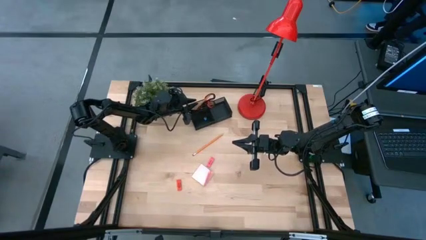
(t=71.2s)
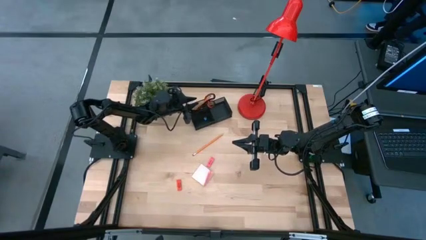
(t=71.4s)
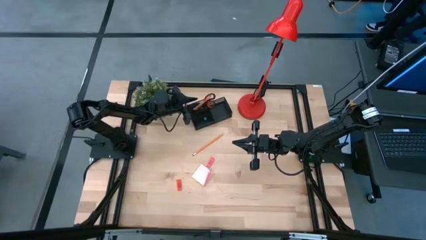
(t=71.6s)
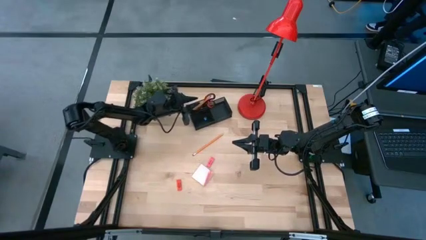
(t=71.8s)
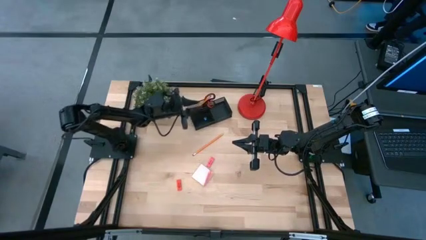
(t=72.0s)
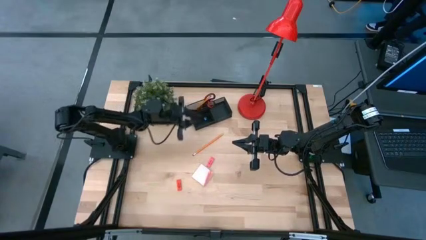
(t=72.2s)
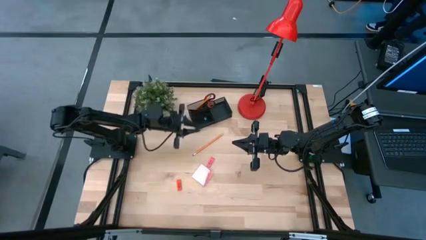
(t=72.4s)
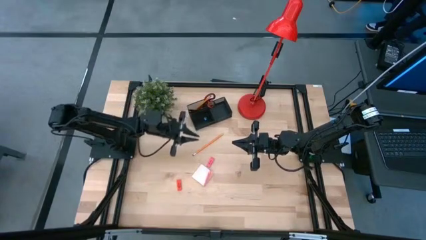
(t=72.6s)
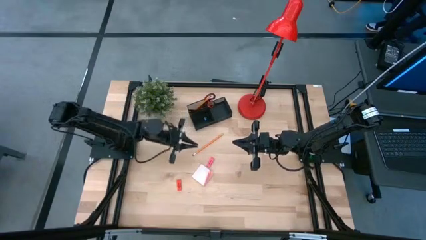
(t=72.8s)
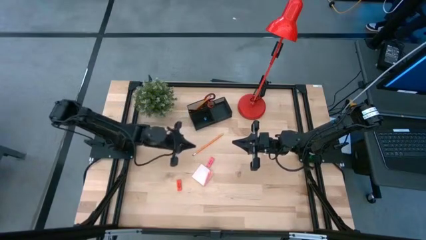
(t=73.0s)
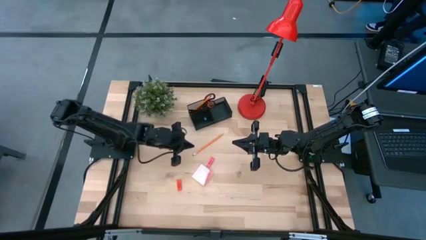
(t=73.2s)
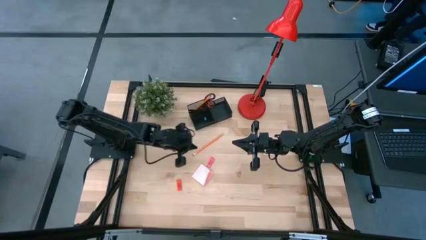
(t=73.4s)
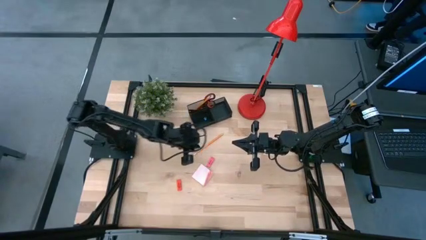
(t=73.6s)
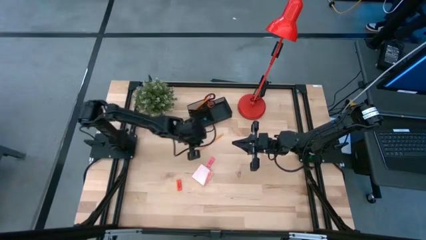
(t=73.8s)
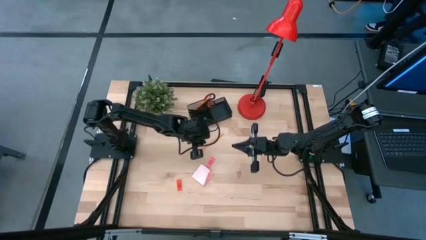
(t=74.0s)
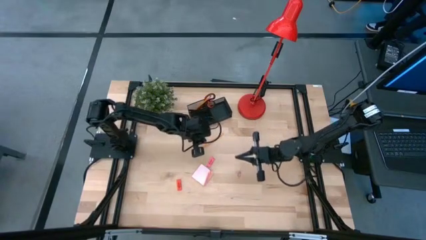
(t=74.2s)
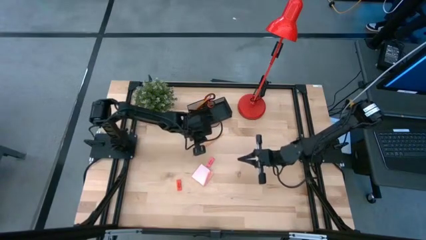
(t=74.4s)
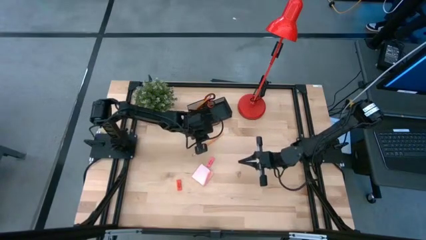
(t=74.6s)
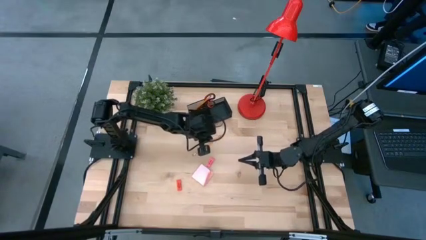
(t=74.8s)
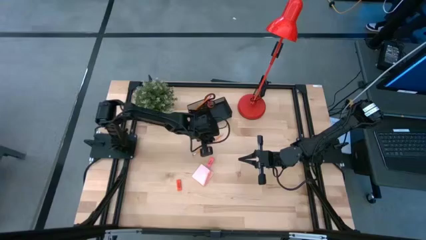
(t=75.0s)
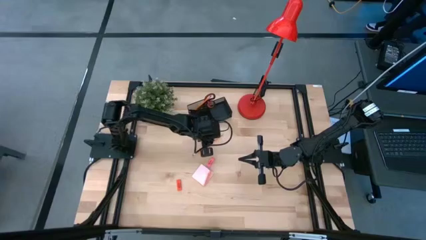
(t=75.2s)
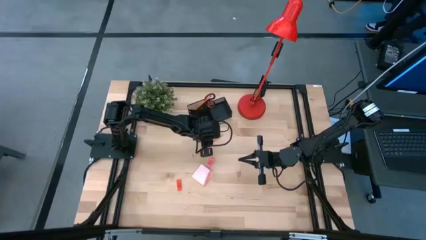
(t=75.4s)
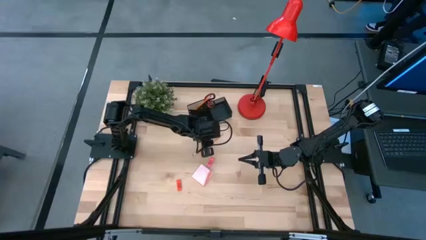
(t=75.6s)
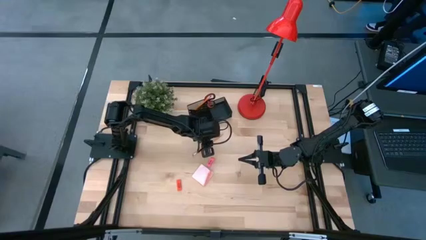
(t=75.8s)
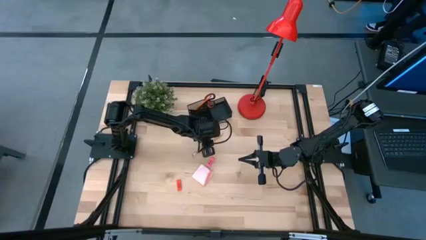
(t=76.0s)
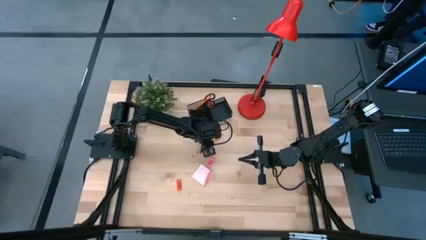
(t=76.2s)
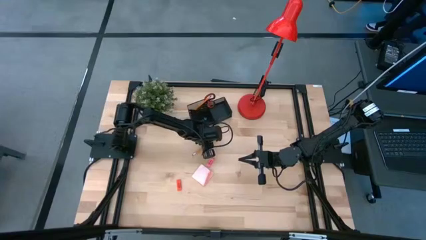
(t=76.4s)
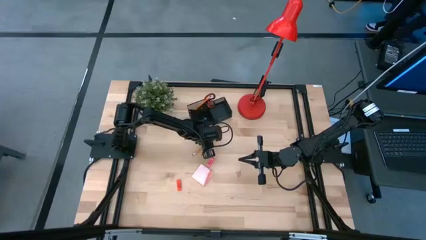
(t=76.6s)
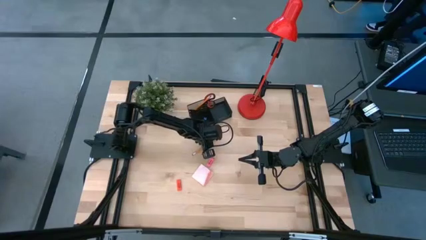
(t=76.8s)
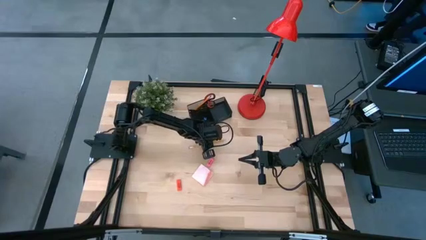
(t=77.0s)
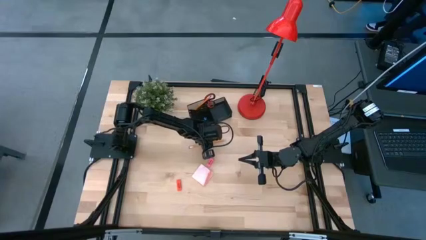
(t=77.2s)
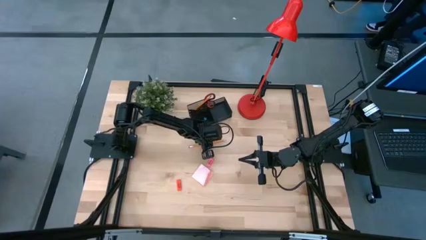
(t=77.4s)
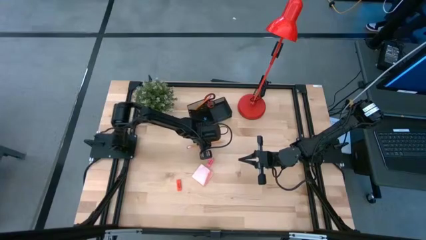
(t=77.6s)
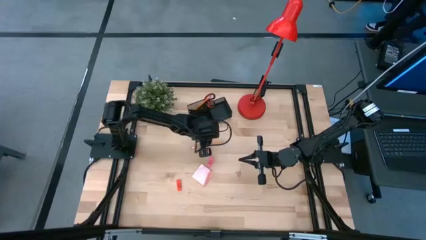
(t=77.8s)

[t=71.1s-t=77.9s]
Task: Pick and place office supplies into organizer
Put the orange pencil into the black desk organizer

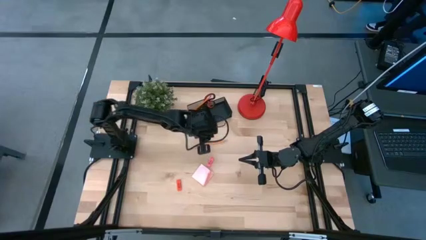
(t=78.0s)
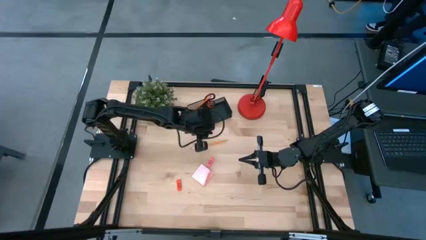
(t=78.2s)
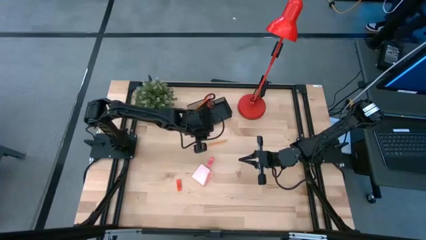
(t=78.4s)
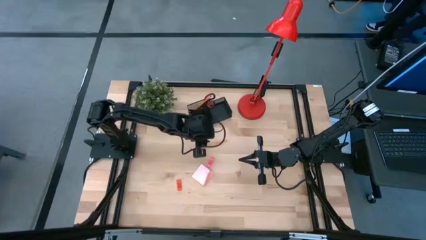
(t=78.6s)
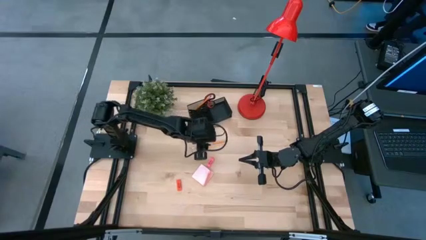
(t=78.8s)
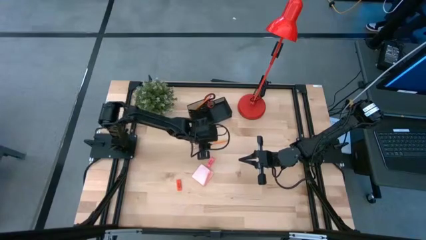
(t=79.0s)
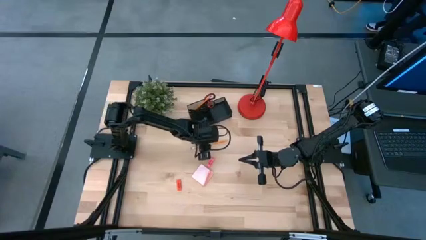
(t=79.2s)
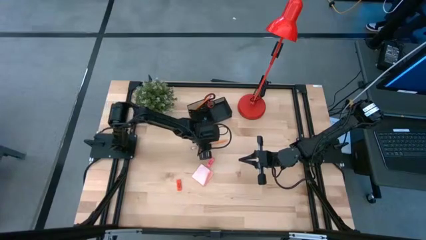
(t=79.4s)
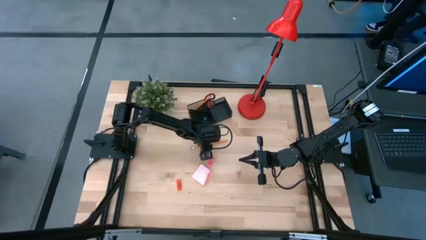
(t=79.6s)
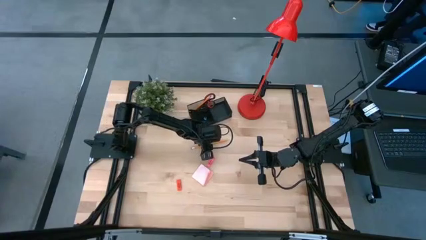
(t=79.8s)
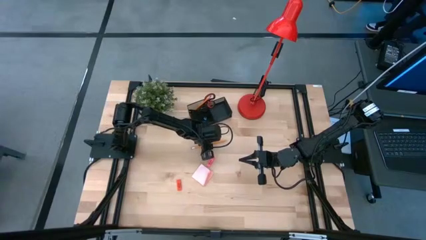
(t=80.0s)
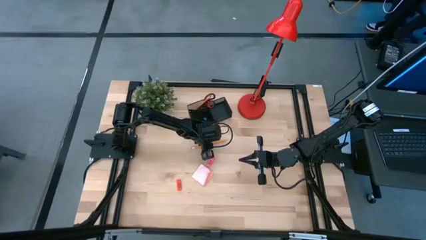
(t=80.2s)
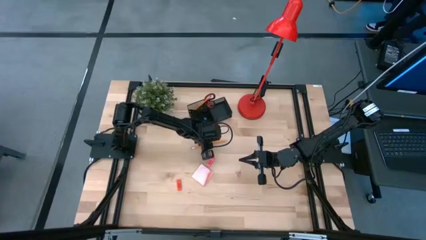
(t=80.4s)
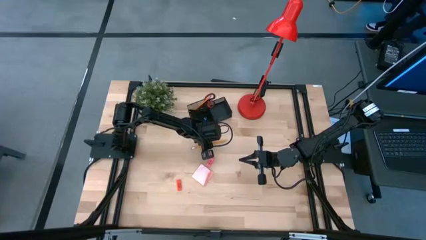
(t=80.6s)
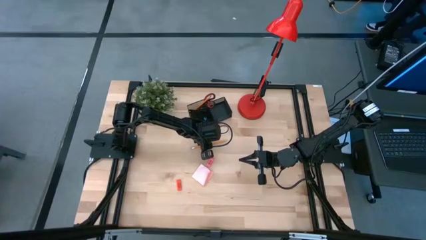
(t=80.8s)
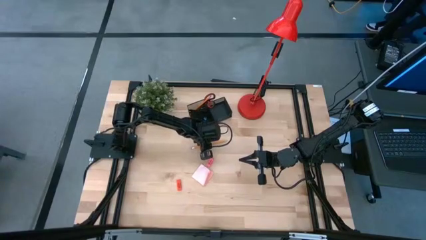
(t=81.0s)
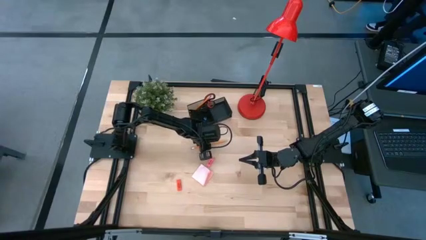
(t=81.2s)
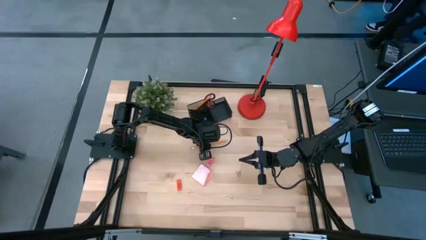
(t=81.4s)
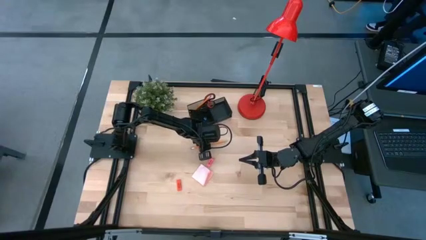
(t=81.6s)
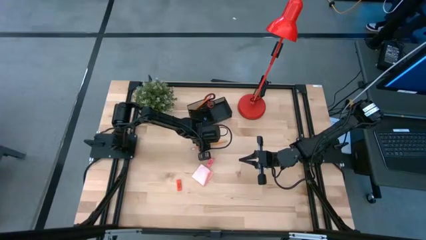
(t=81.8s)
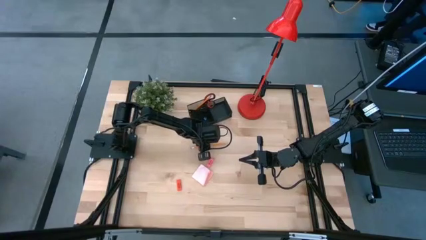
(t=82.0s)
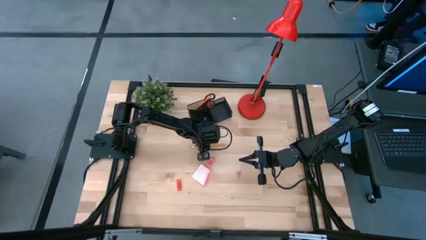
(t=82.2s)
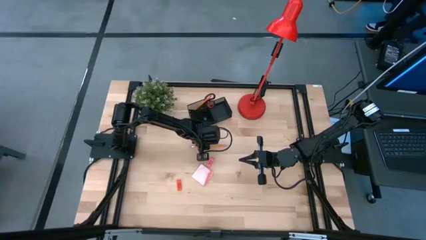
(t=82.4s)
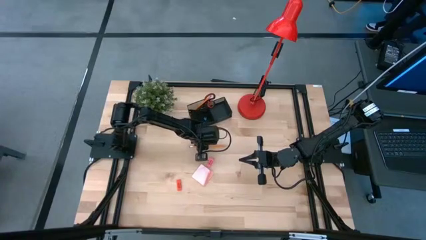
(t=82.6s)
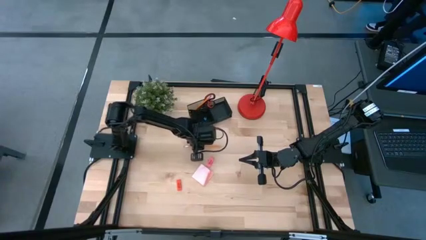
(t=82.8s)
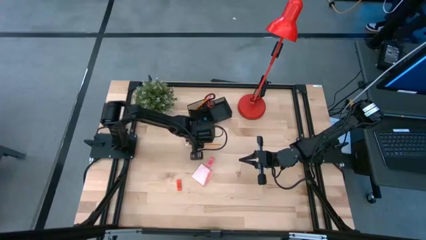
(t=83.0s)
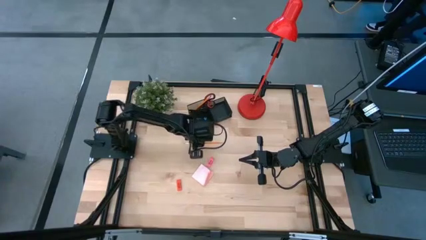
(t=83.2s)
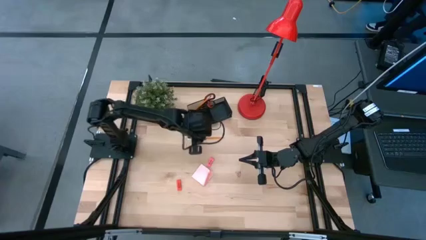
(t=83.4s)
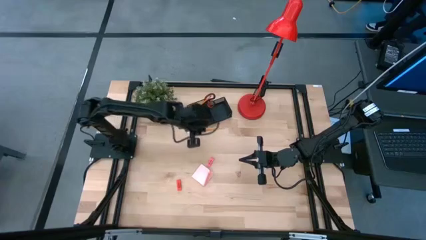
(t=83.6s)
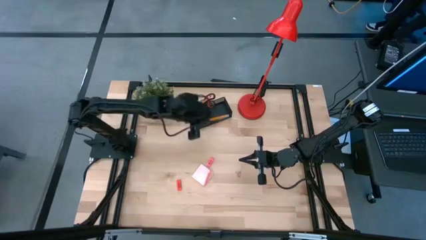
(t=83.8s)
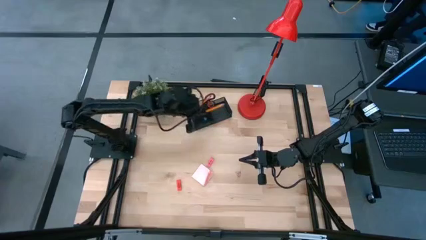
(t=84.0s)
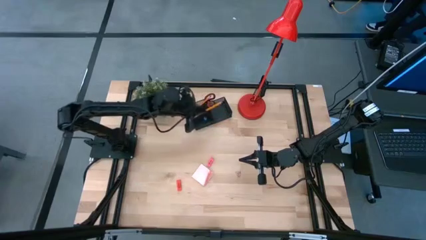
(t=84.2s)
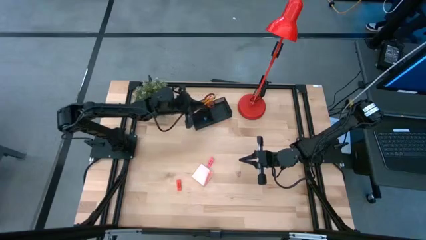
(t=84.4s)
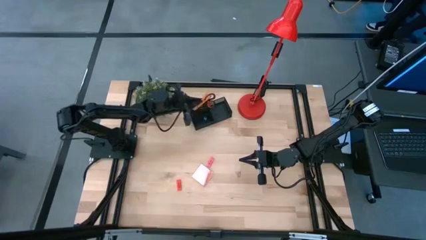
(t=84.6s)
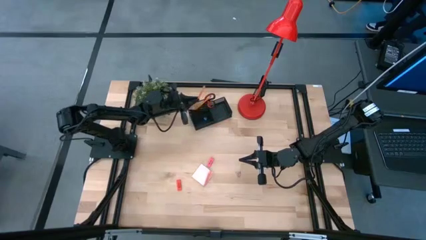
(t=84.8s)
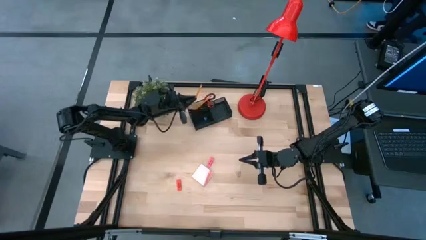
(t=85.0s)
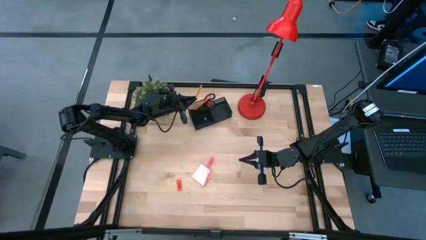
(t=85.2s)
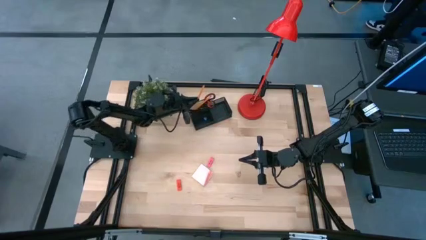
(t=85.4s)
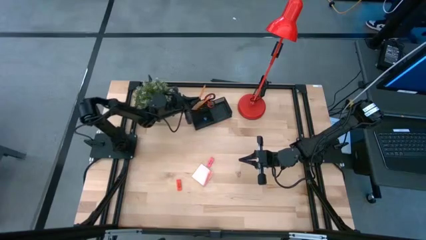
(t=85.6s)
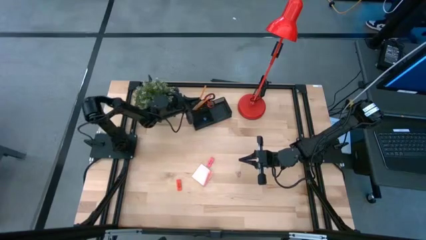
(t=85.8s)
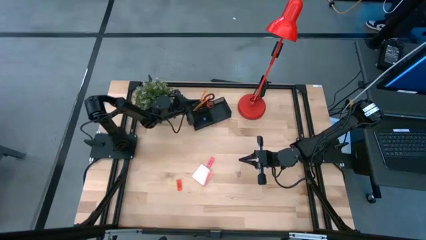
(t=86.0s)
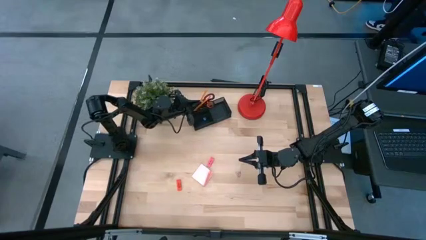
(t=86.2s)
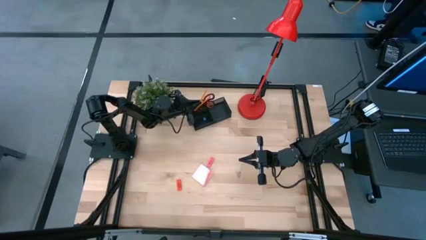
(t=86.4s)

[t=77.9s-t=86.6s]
Put the yellow pencil into the black desk organizer
